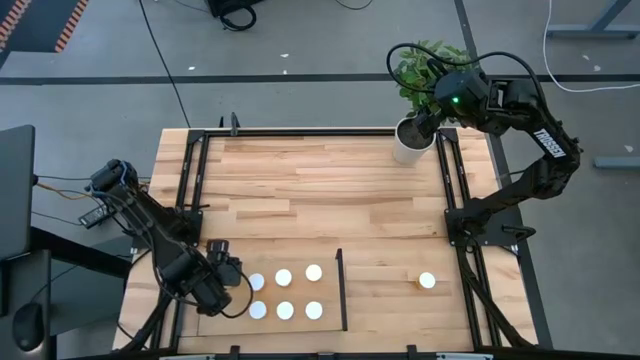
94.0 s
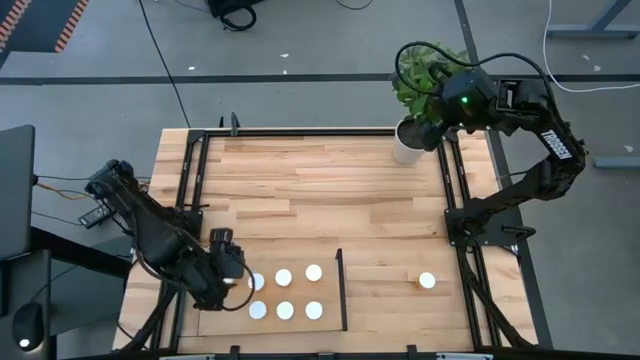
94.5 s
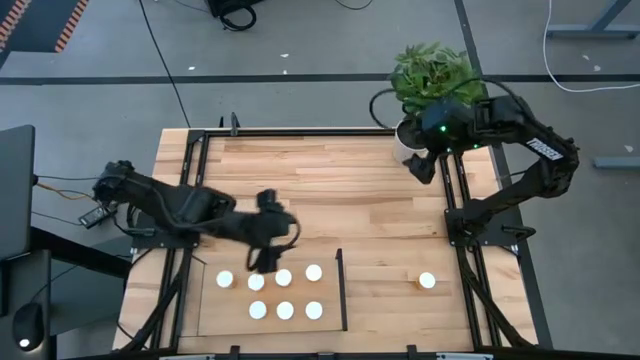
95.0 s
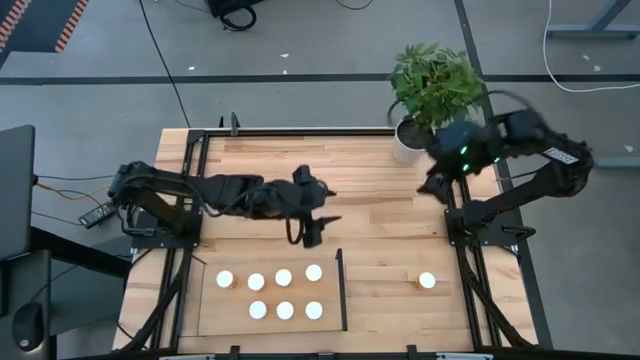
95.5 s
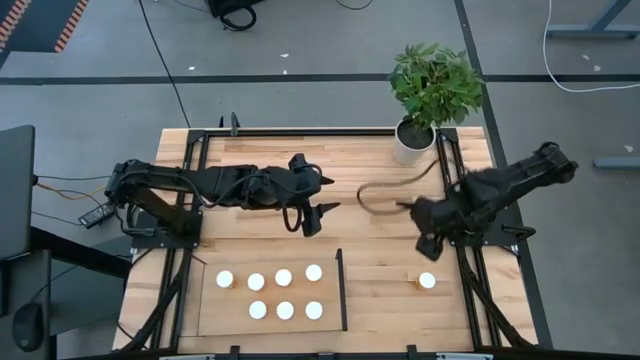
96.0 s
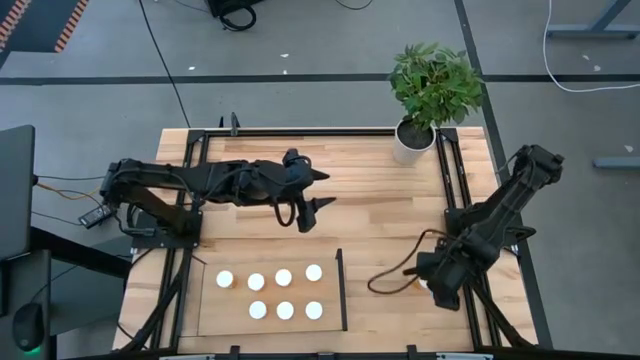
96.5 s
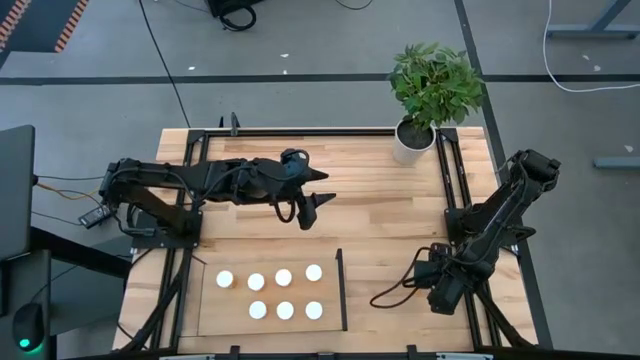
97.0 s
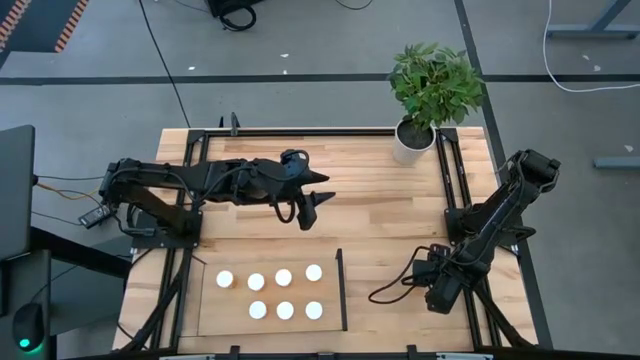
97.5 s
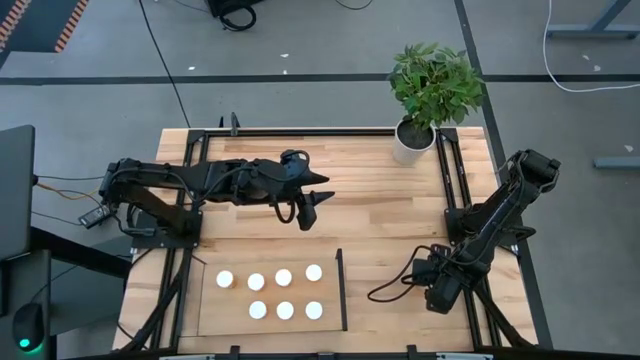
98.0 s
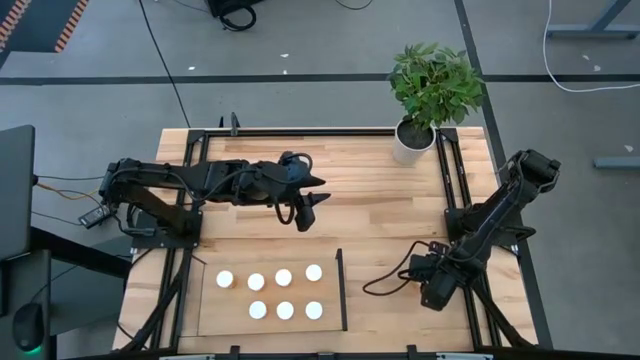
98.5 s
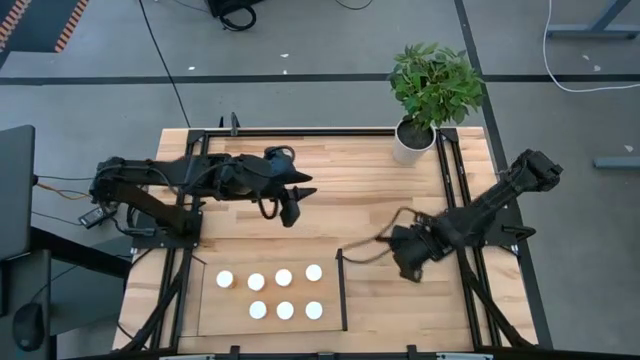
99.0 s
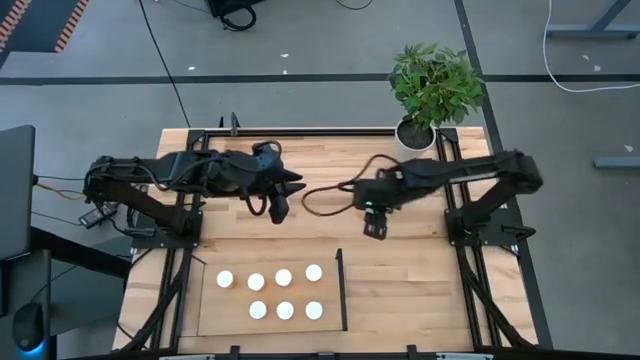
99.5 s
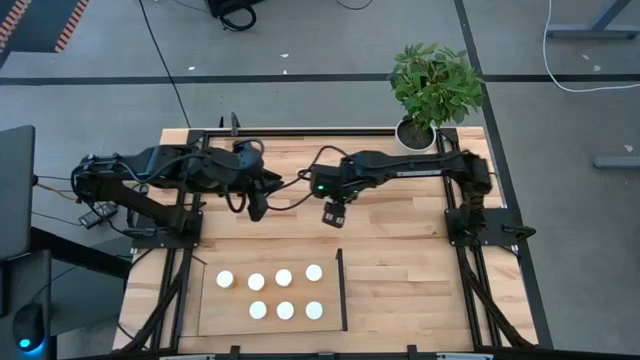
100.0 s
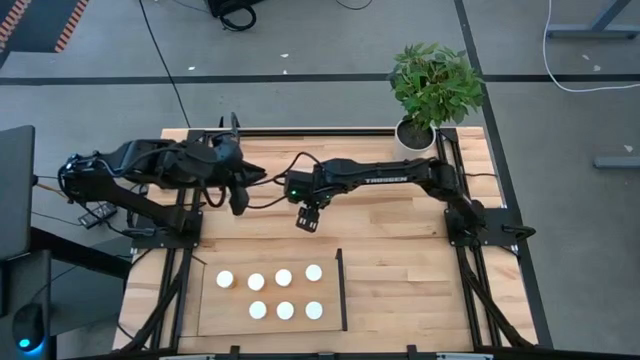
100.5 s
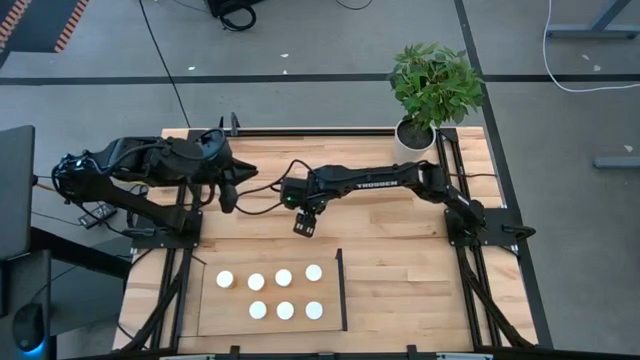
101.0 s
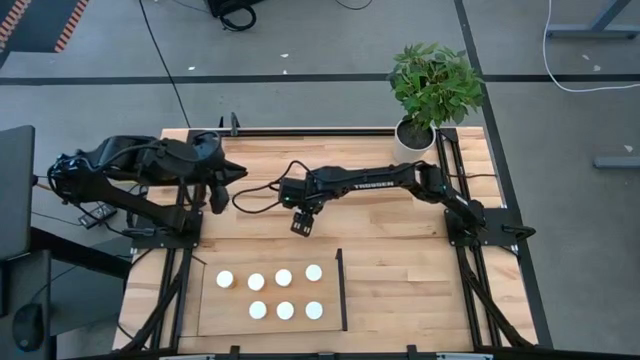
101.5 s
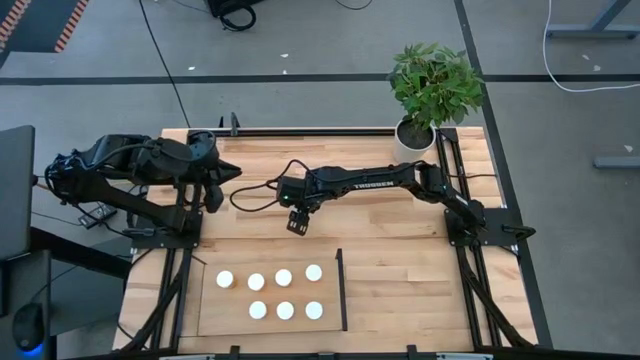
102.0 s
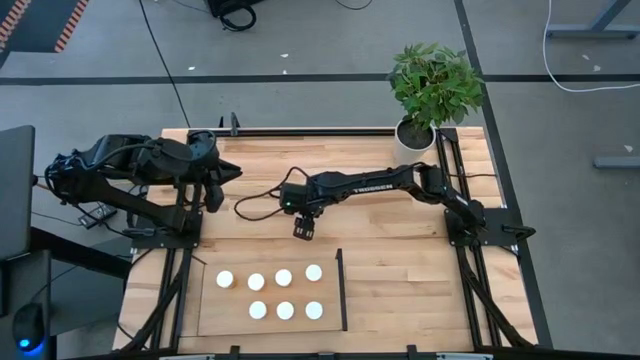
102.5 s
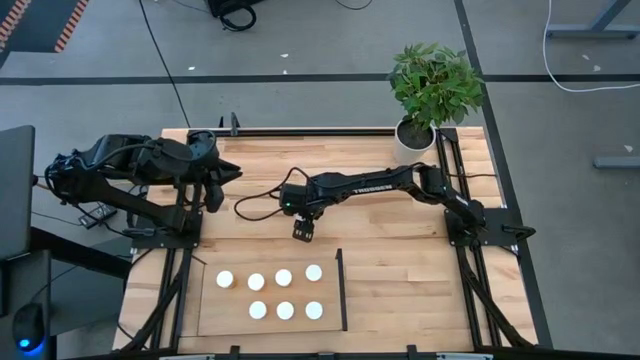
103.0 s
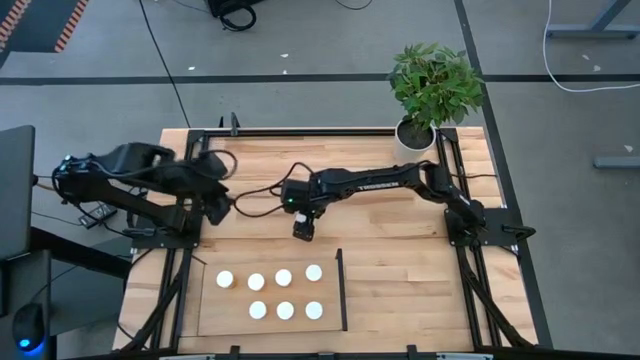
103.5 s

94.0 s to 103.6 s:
Task: Pick and place medicine bottles onto shelf by color
Move the orange pill bottle to the center of the table

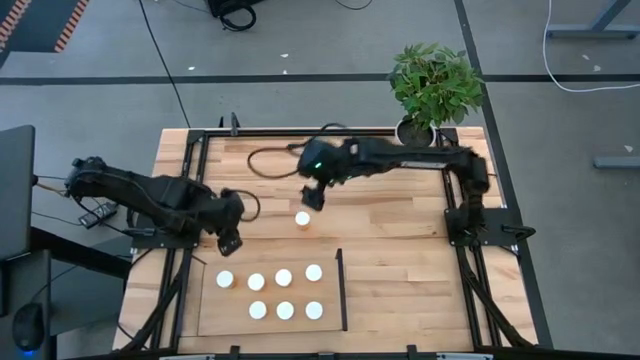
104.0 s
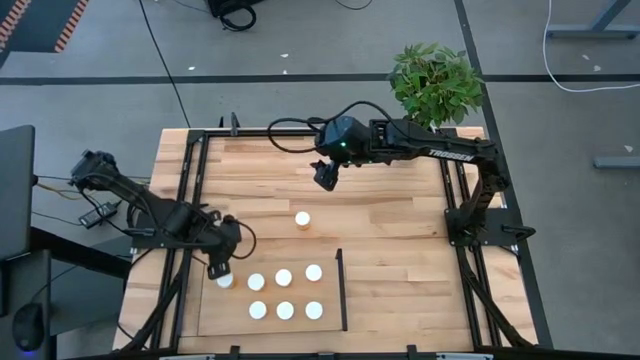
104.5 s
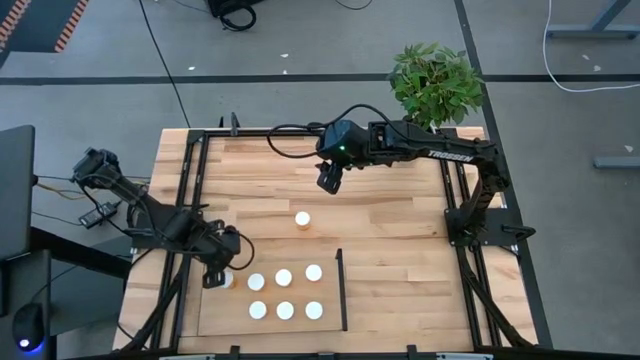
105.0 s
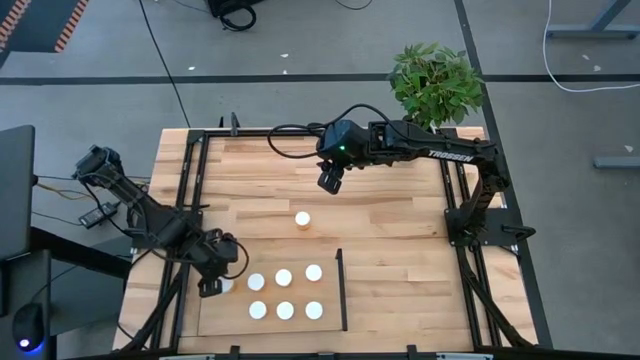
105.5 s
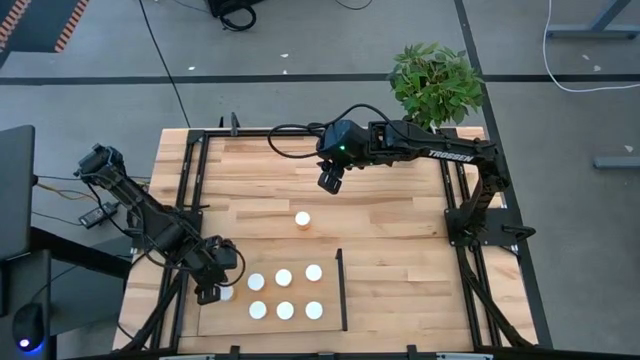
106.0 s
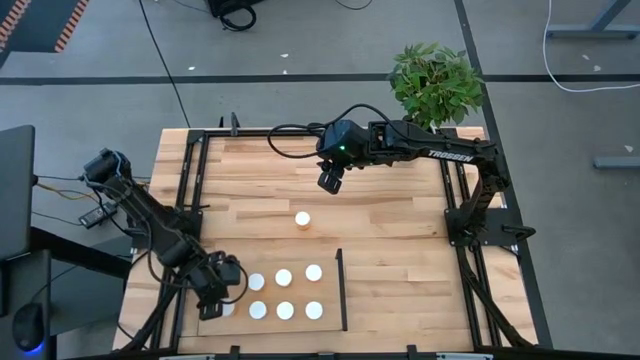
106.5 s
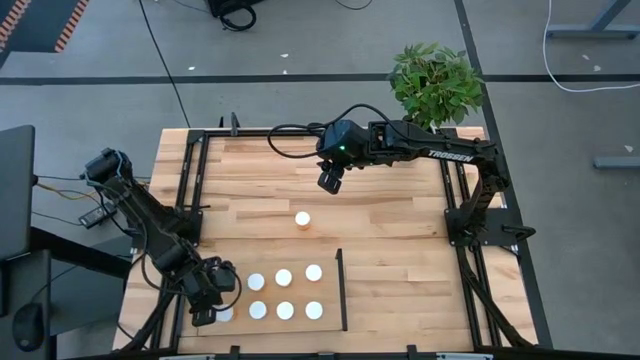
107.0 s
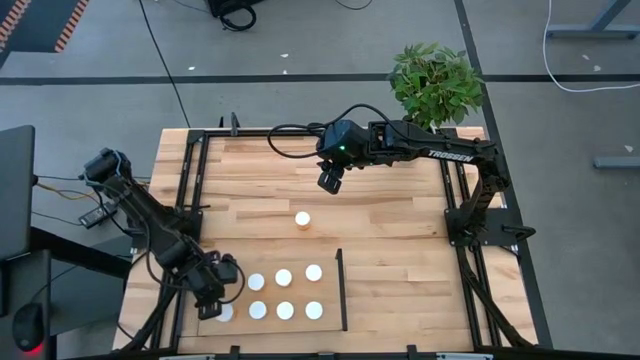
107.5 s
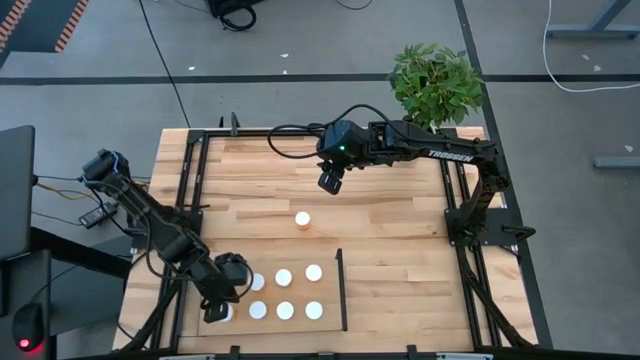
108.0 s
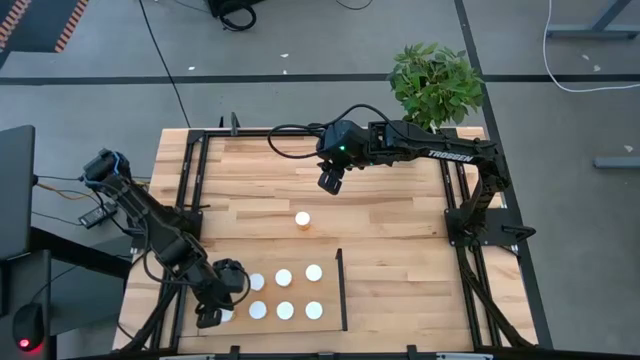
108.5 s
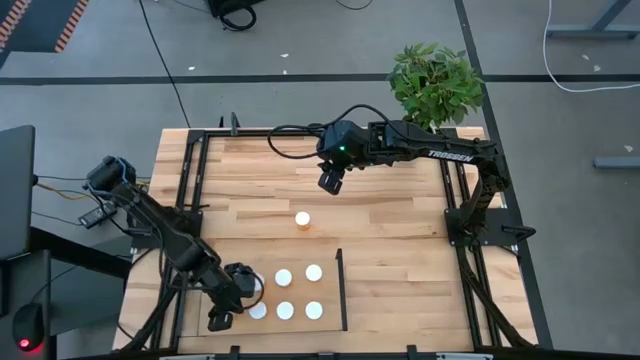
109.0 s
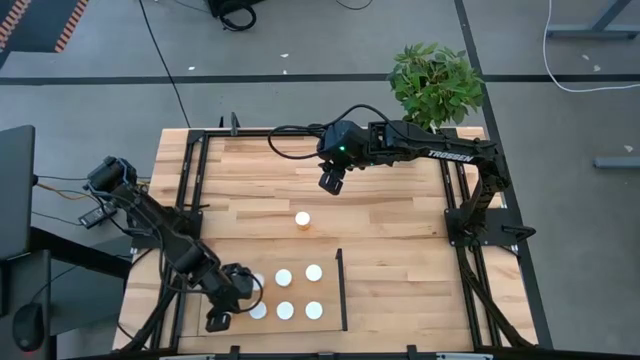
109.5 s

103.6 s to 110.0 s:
Adjust the orange pill bottle on the shelf

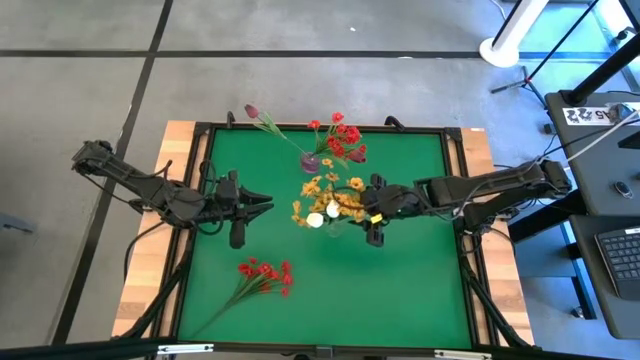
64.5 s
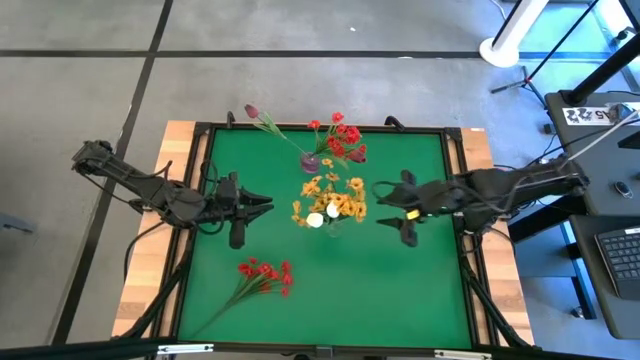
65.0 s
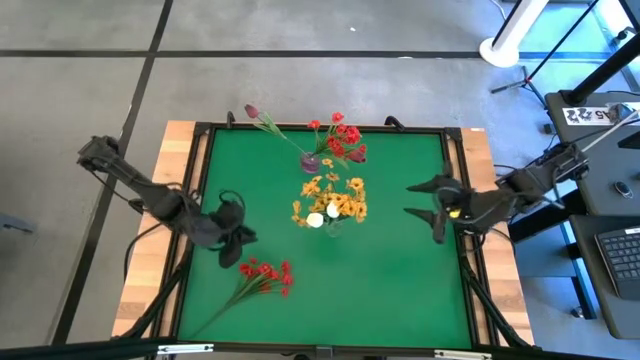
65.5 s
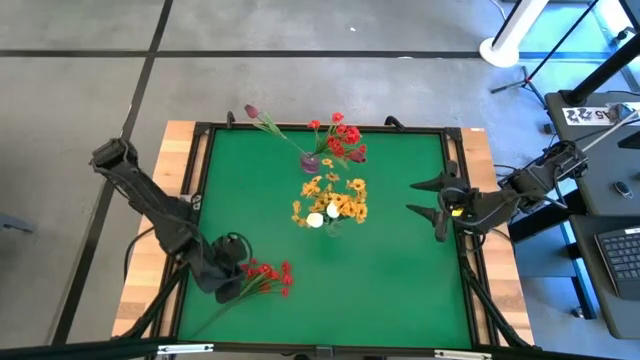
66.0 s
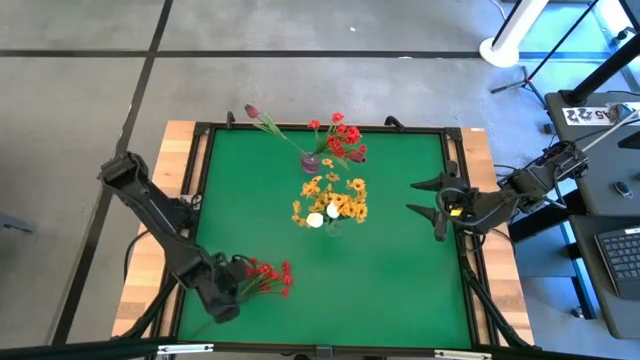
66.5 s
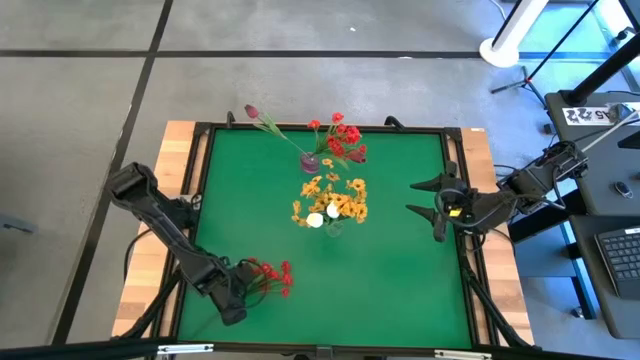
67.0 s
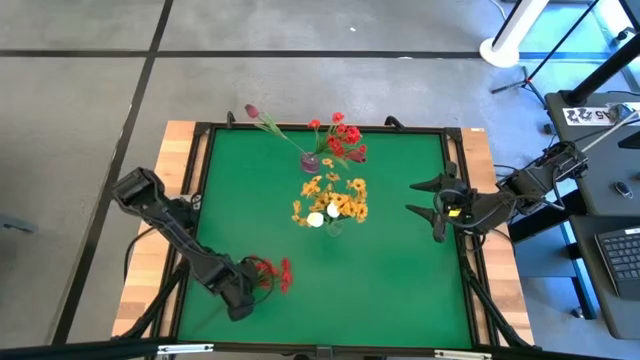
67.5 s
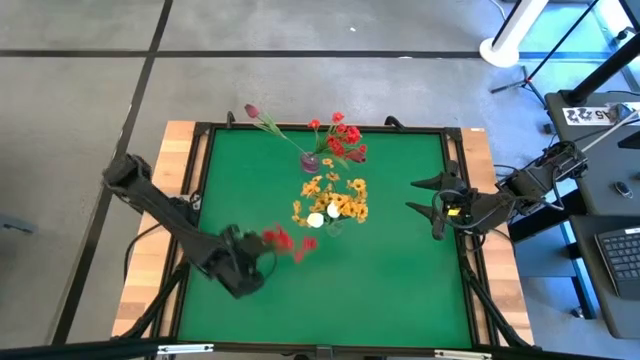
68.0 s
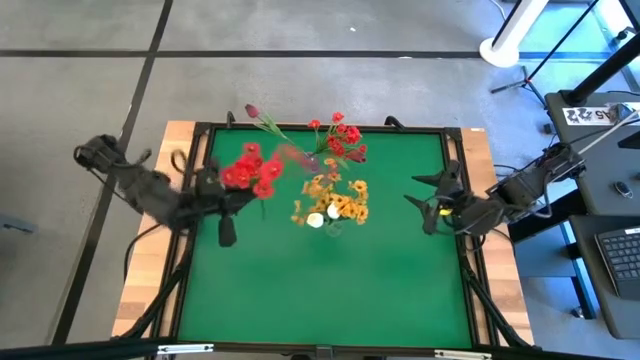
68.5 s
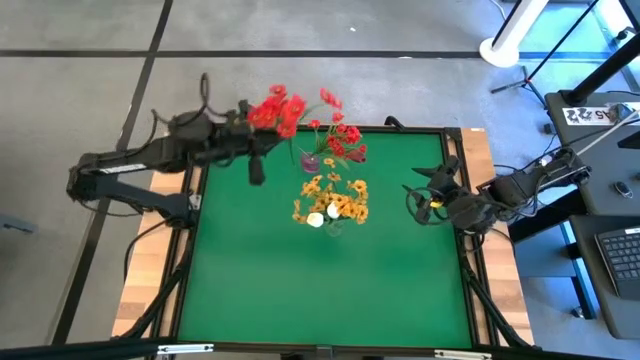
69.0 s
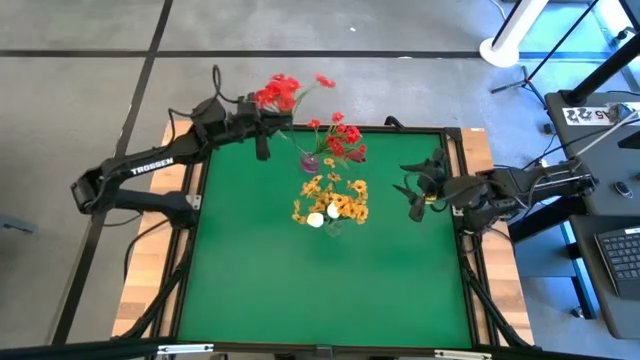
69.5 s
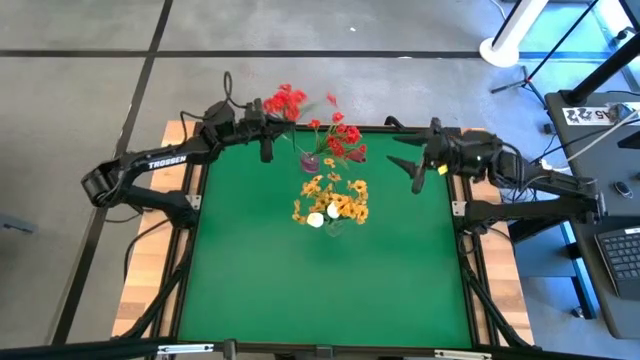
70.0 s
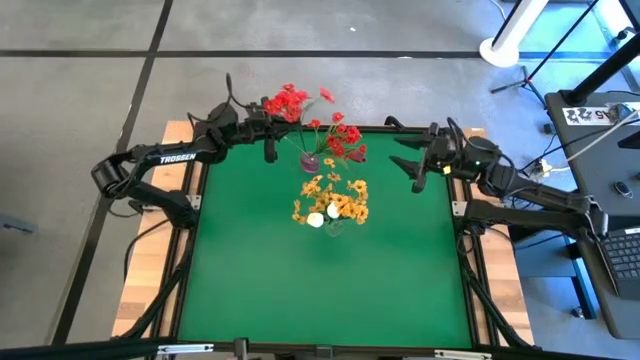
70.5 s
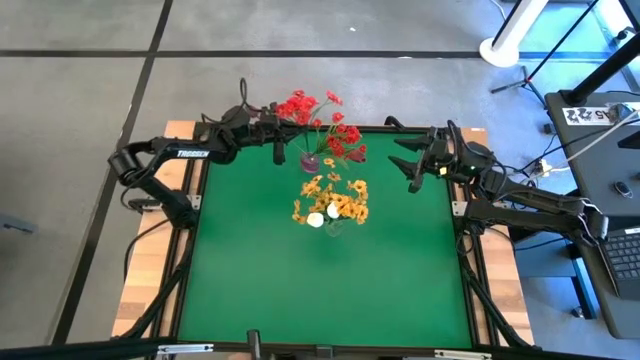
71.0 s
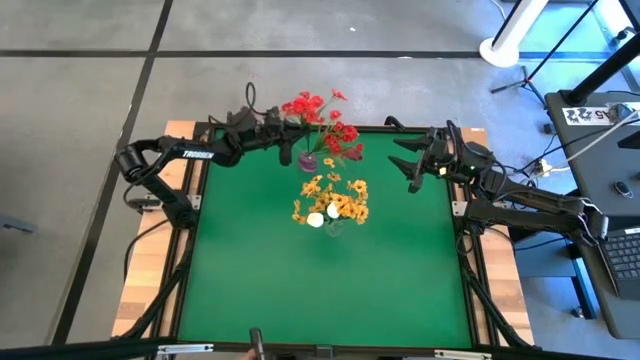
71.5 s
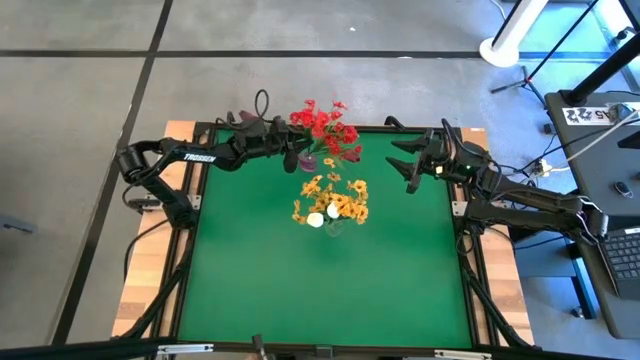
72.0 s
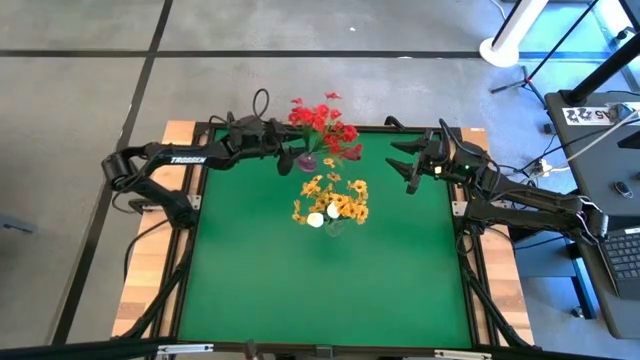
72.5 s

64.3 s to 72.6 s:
Task: Sort flowers into vase by color
Put the red flowers into the purple vase
